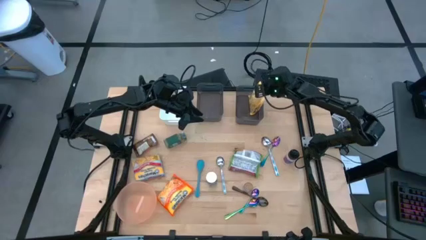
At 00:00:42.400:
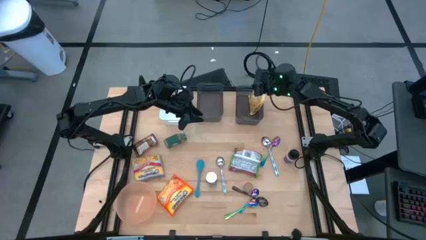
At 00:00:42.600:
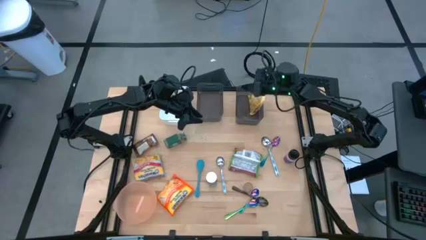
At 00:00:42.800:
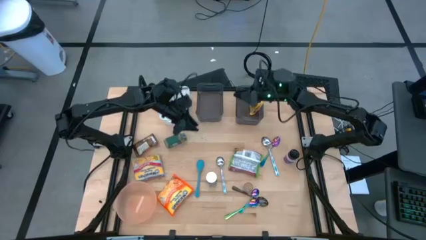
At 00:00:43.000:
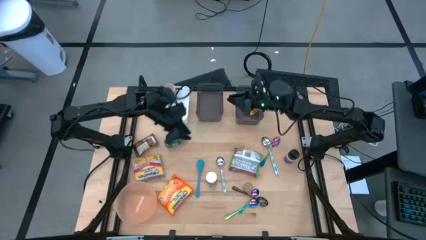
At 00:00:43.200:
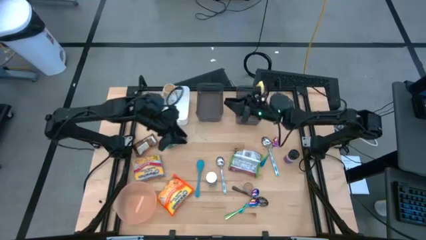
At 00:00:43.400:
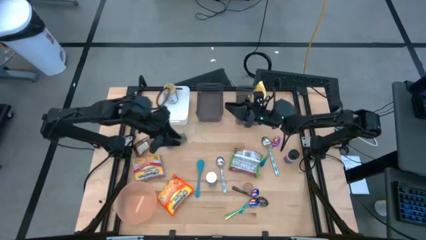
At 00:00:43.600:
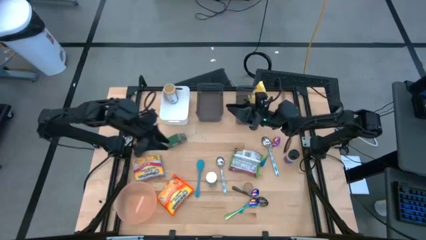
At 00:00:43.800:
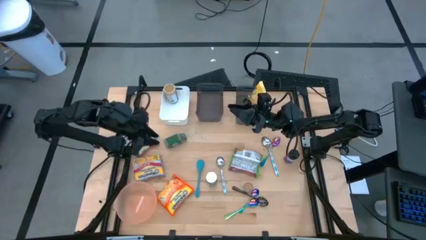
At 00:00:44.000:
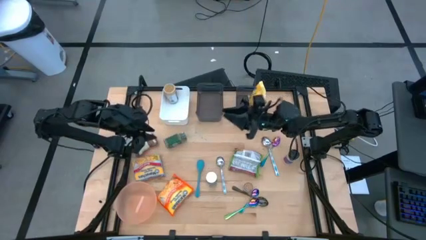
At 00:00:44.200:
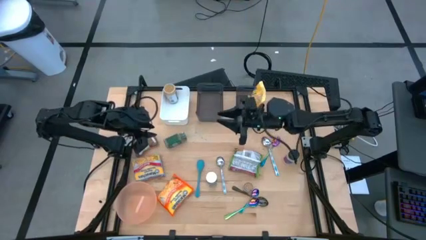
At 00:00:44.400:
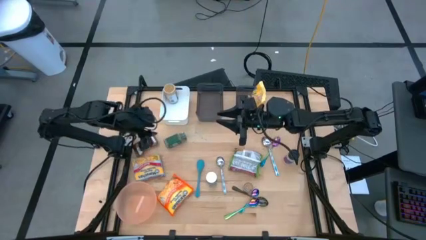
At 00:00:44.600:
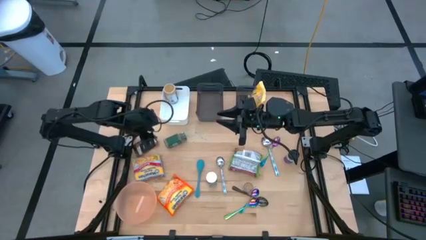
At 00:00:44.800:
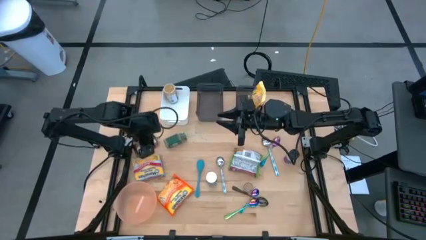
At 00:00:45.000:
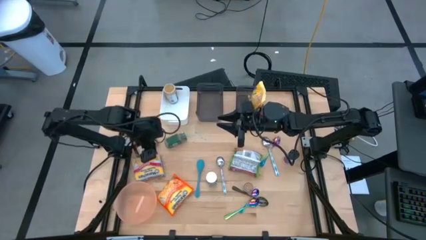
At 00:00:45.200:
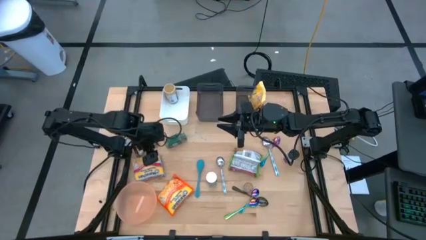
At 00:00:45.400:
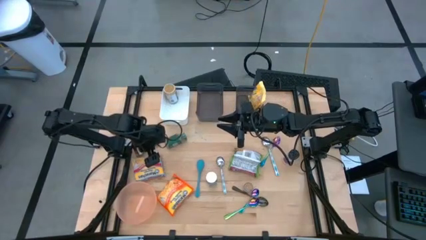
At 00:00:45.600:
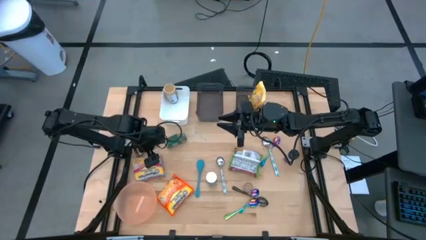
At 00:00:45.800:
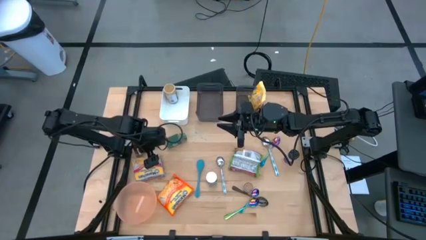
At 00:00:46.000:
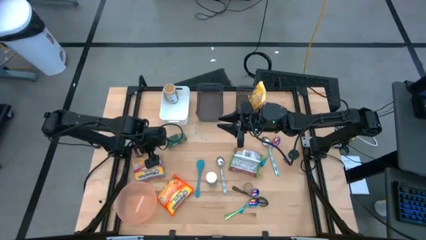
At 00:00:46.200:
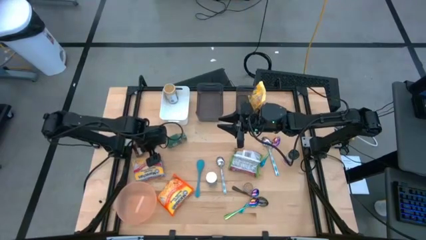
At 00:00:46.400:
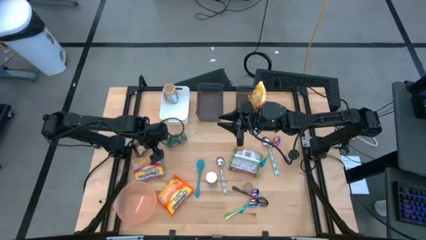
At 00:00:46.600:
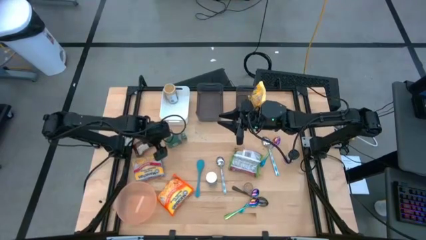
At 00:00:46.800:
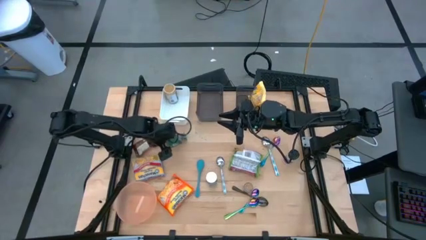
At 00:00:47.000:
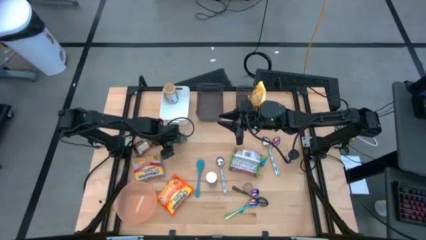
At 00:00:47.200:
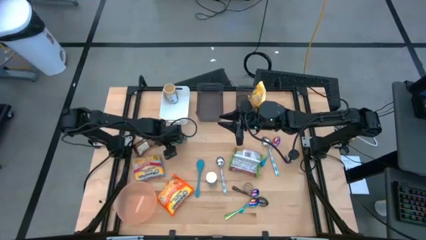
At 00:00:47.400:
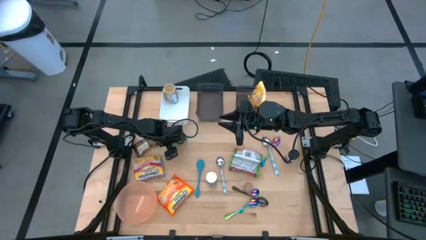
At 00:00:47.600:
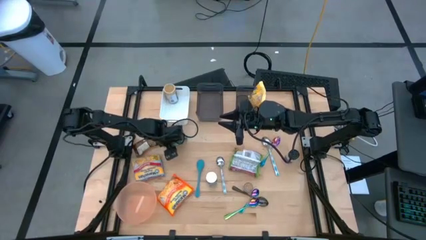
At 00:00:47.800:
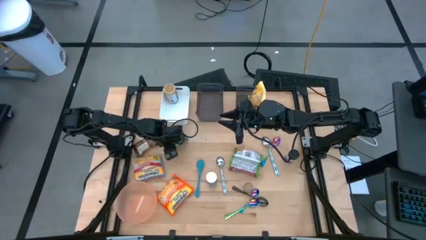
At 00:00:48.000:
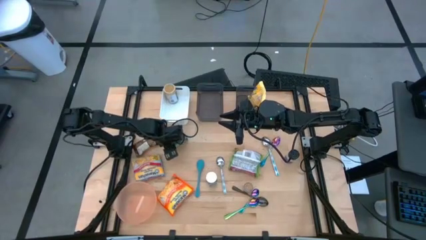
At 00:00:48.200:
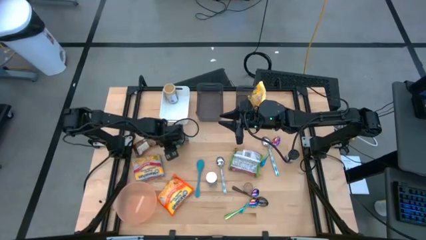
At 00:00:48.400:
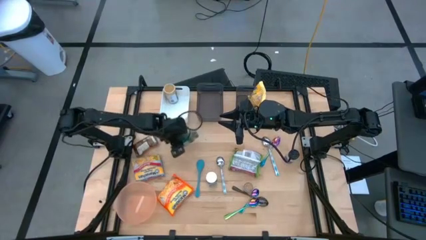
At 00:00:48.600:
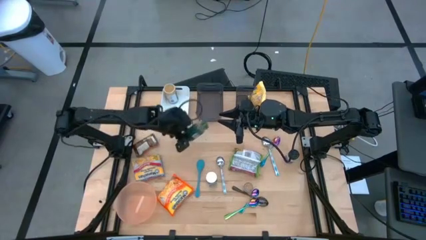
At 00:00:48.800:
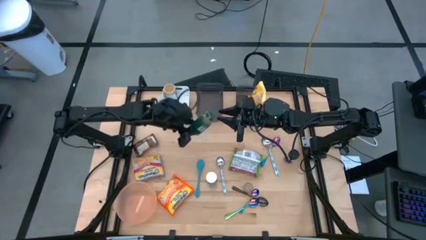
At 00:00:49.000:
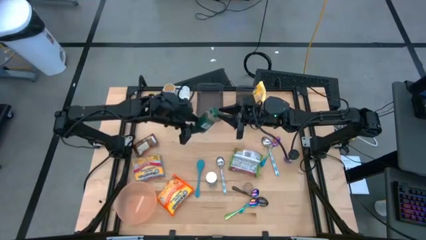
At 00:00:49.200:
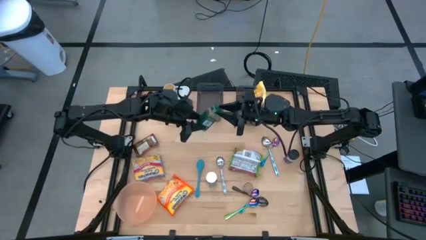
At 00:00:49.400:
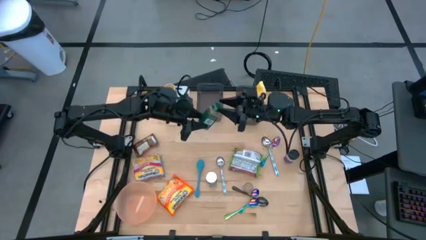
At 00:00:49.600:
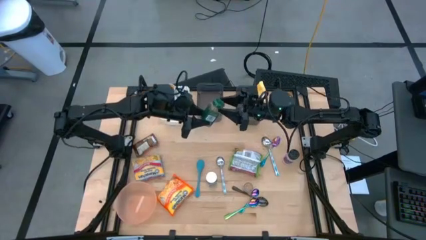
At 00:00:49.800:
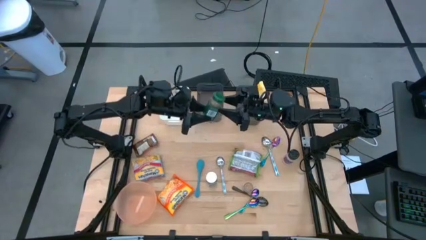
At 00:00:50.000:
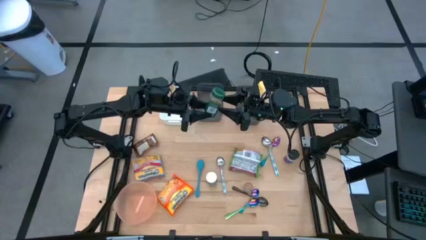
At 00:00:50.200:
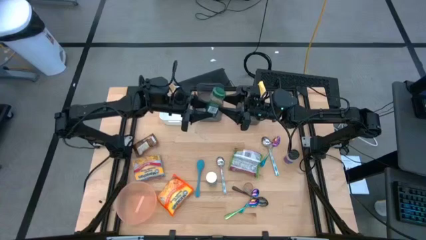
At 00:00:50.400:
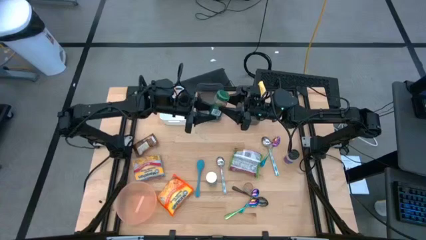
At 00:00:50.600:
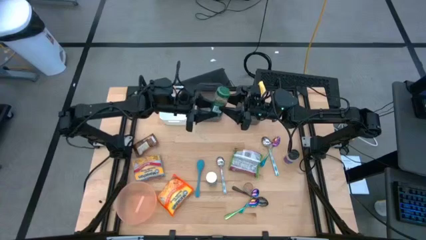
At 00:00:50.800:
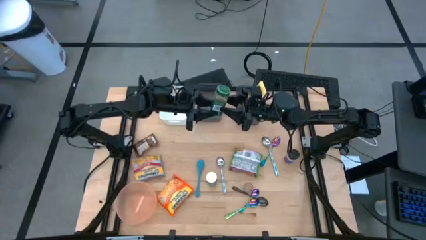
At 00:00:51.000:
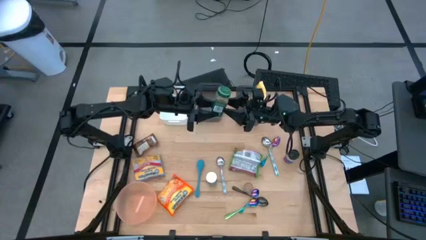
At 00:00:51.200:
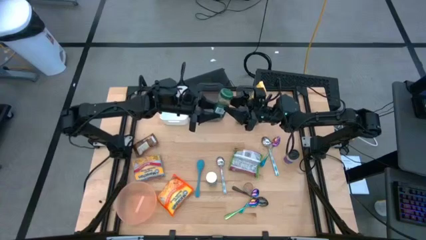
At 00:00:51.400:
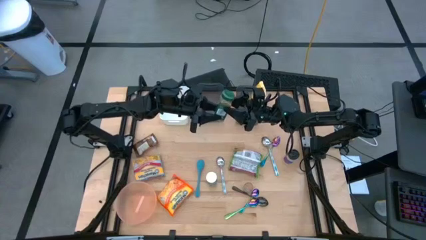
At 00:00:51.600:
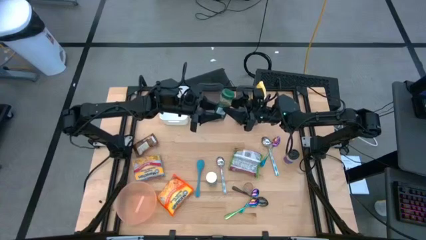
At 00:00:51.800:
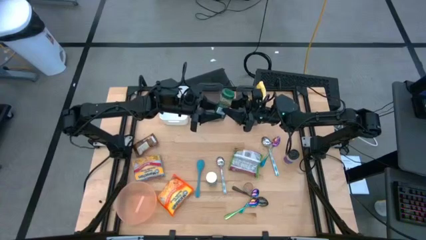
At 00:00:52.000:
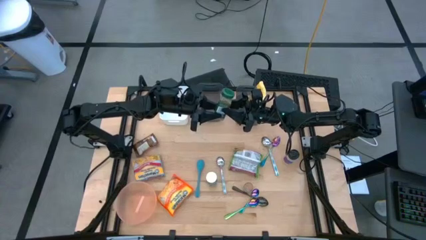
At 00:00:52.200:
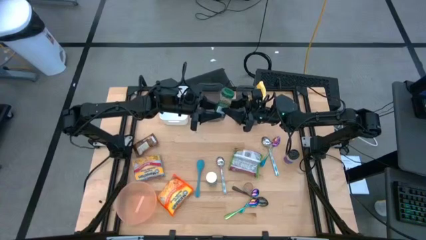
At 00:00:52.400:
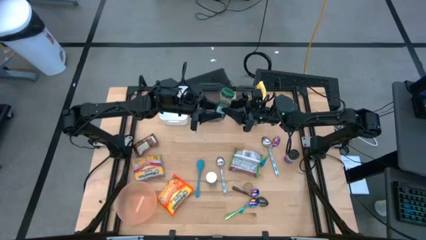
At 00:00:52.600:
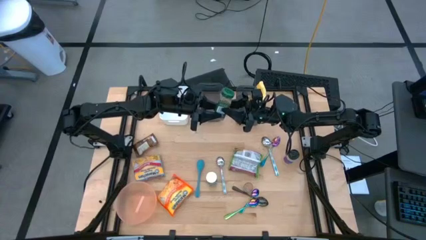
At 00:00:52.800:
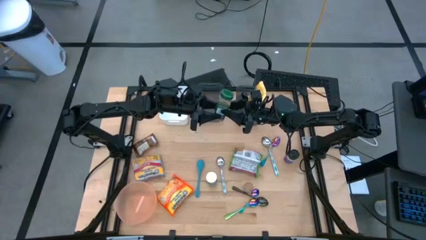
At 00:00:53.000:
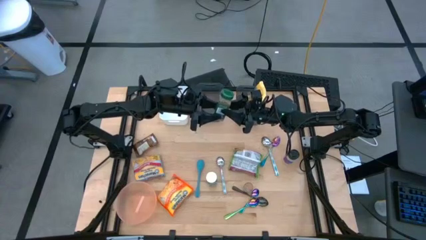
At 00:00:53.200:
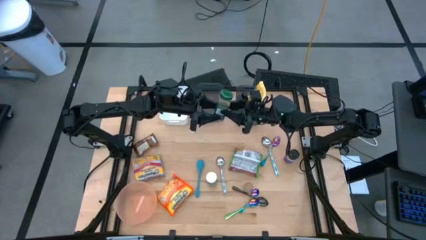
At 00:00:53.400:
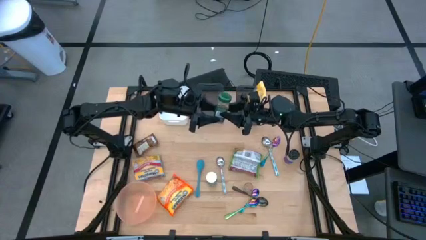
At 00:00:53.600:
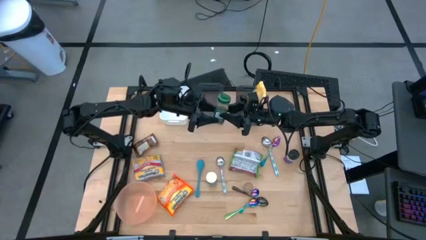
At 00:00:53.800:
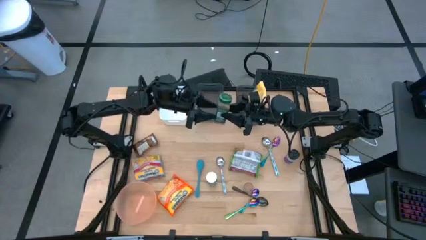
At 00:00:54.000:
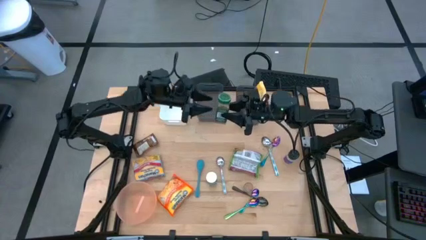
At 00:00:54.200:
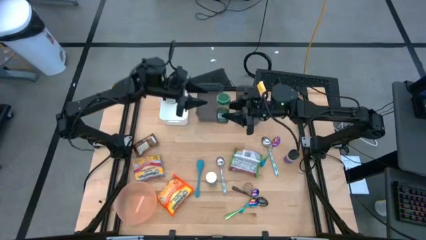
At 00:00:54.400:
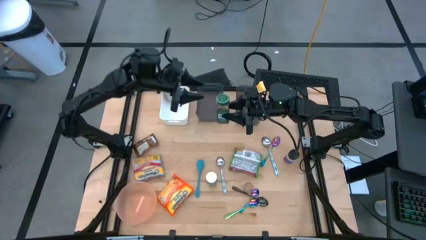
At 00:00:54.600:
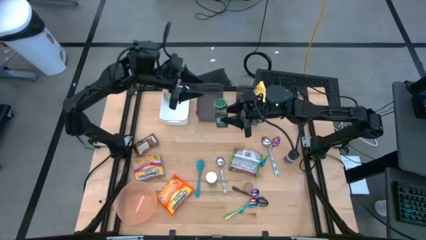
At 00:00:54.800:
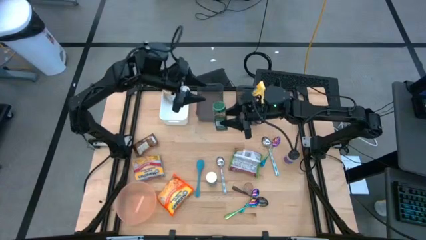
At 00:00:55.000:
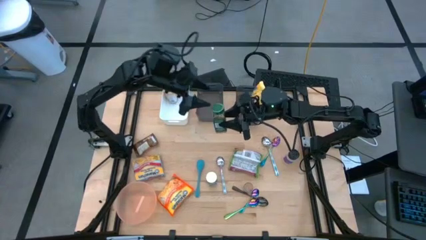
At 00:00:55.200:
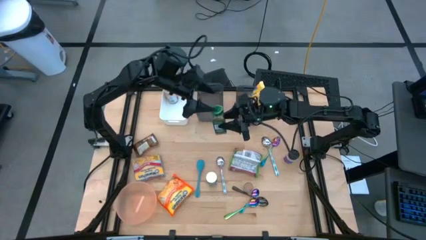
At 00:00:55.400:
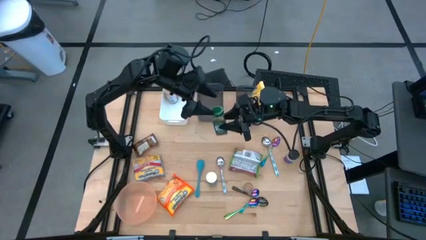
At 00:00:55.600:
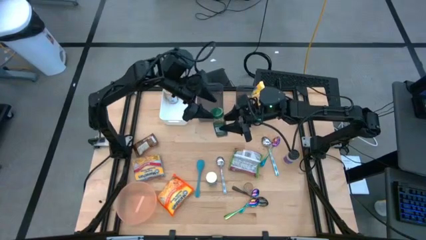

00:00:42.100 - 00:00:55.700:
Task: Pick & Place Food Item
Put the green seasoning bottle into the white bin
